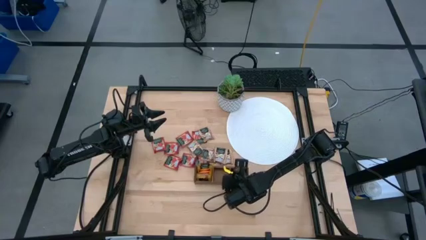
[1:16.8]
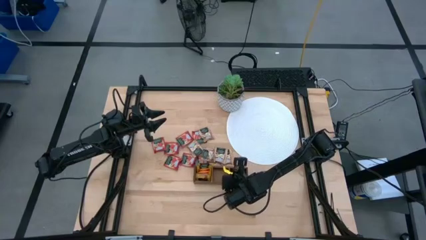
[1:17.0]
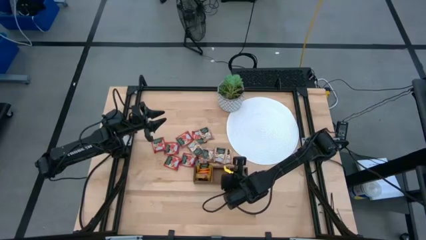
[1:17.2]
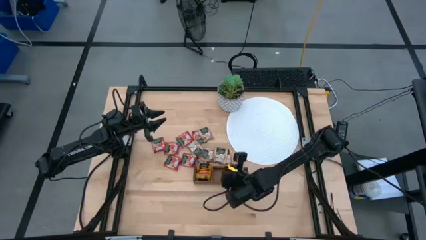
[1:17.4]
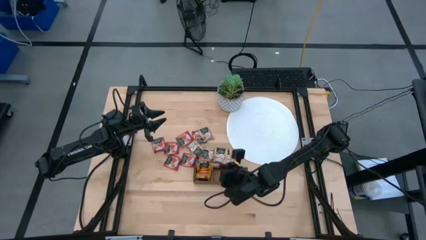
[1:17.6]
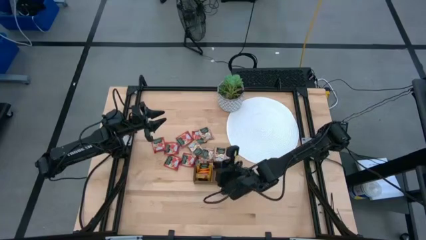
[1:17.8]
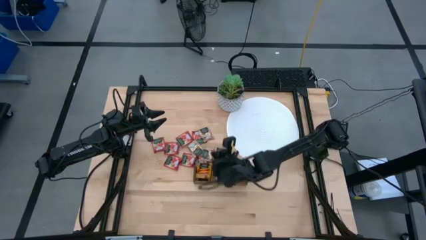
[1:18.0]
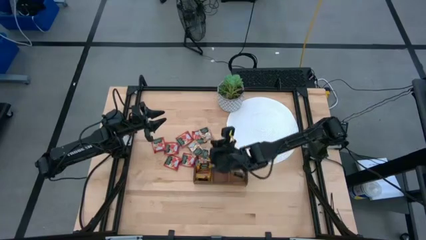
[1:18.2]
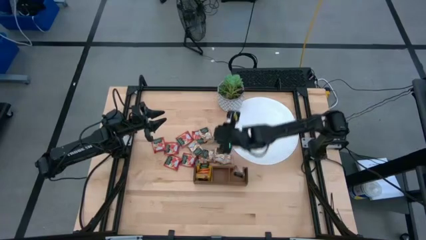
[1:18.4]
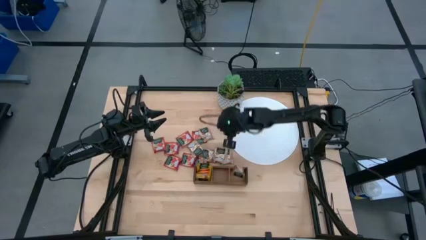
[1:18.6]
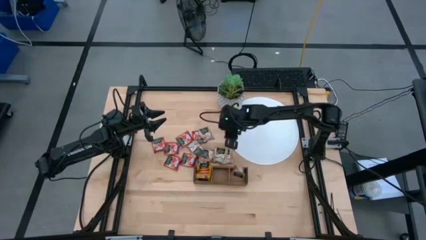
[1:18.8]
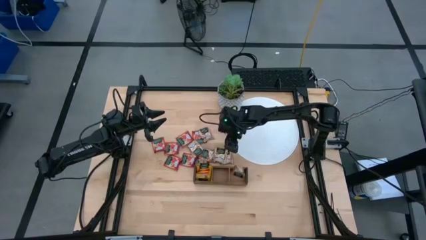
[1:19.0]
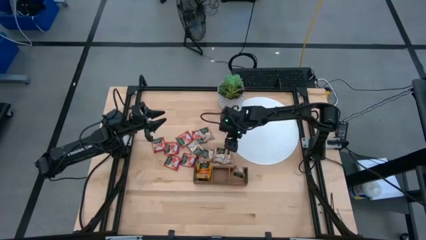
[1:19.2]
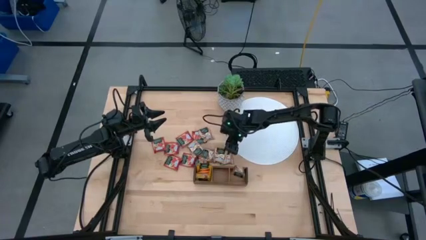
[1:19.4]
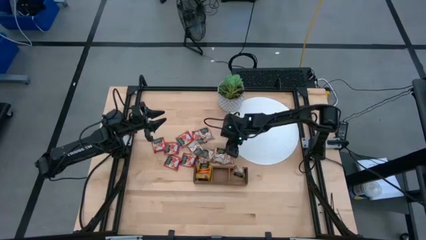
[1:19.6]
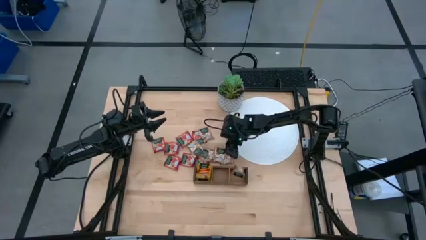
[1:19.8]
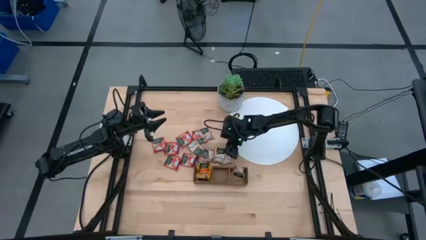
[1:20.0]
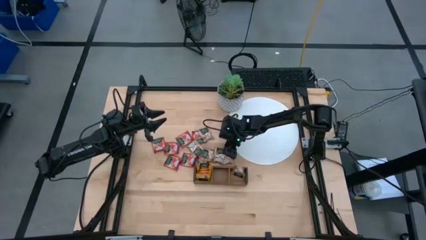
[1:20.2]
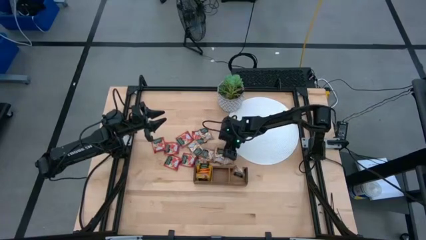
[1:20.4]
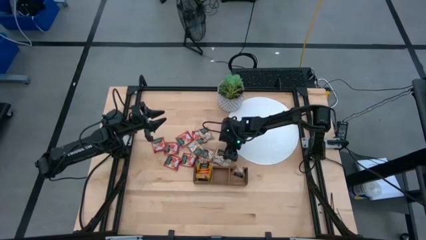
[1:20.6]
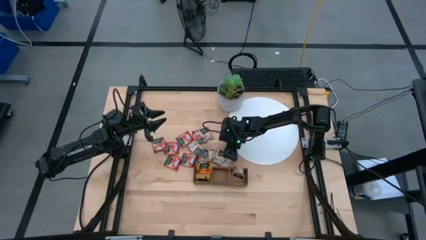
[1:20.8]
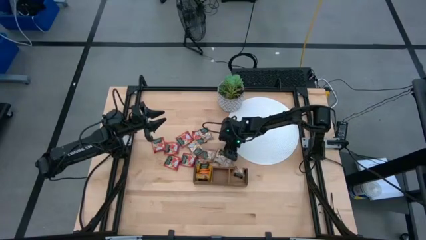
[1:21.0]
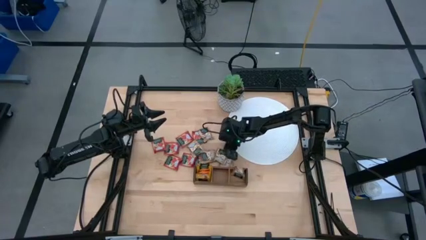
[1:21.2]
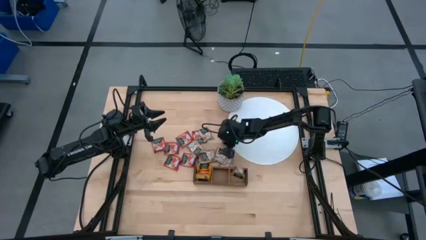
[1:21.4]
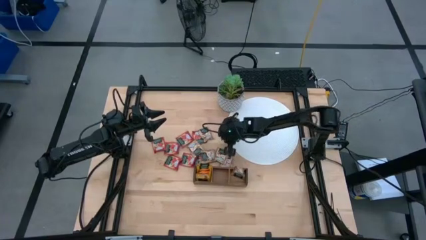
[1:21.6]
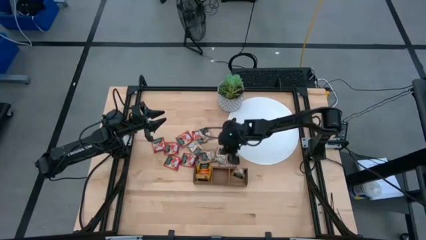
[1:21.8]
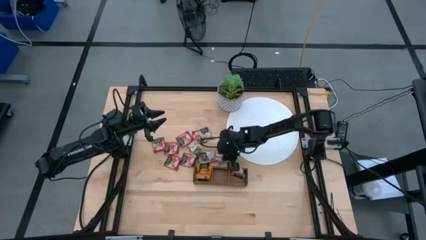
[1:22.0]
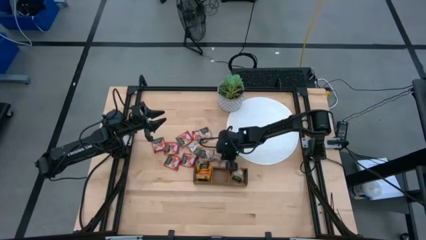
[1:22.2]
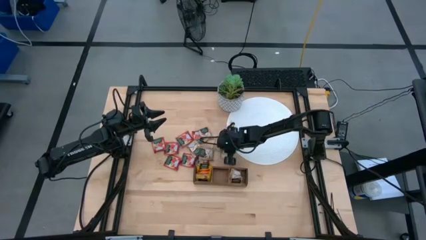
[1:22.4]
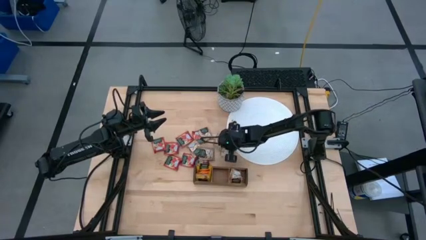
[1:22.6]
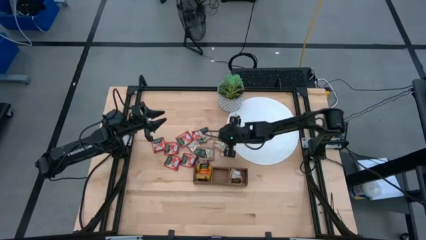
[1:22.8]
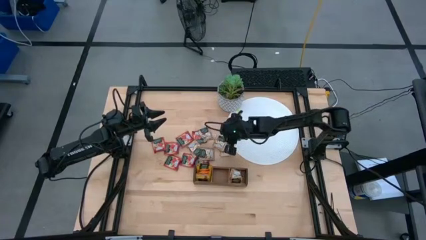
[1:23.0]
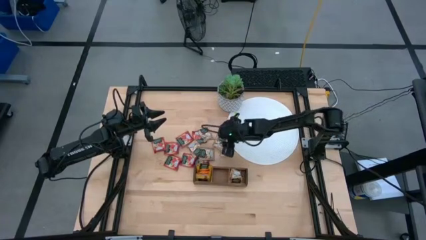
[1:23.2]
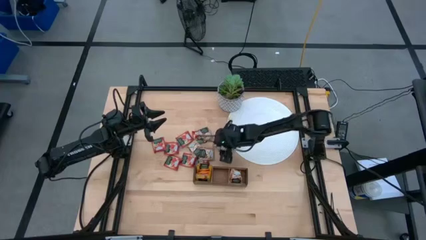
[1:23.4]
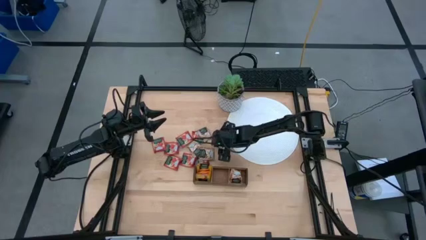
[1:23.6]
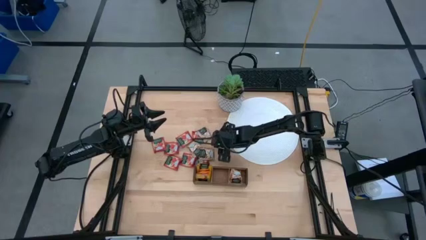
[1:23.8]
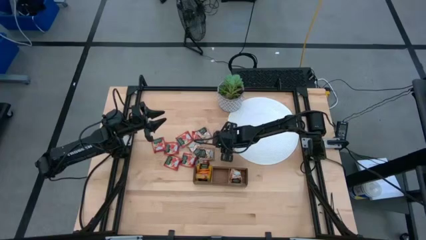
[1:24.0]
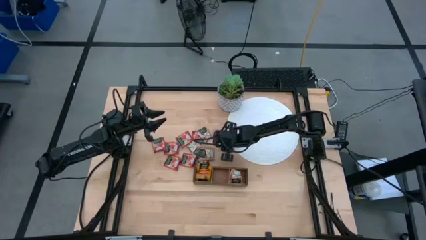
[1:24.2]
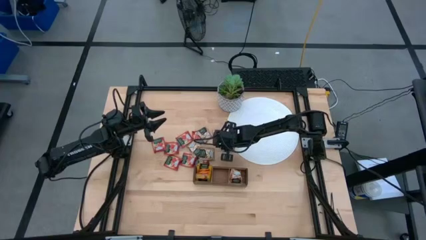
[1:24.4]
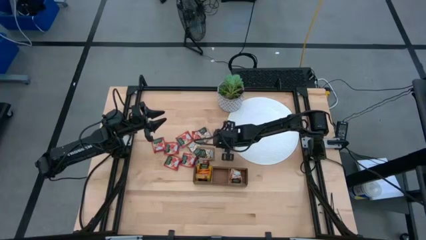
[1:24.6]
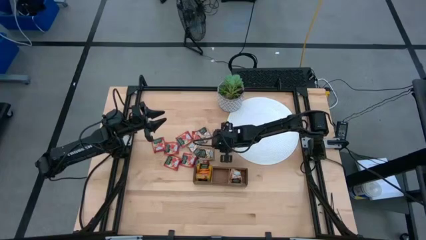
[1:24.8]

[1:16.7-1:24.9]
Task: Pick & Place Tea
Put the light brown tea bag into the right section of the wooden organizer

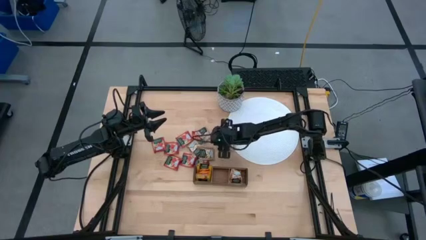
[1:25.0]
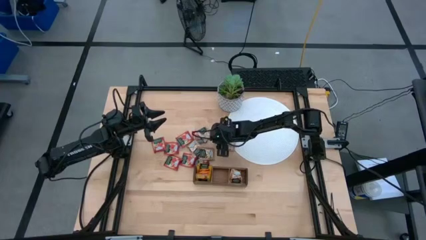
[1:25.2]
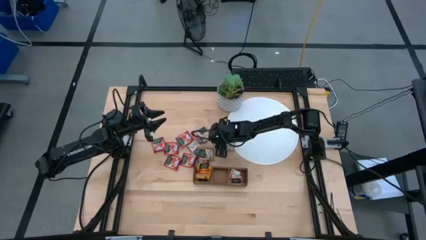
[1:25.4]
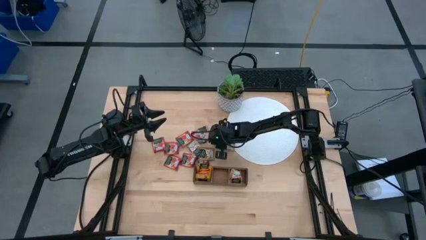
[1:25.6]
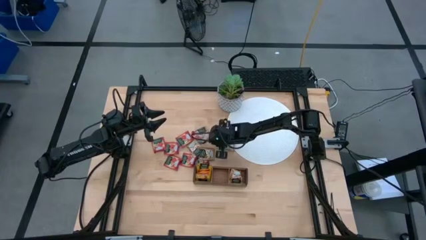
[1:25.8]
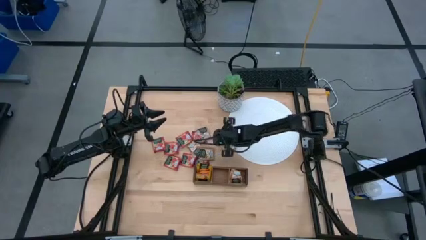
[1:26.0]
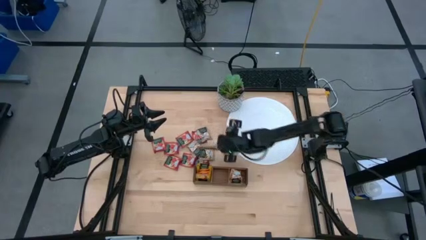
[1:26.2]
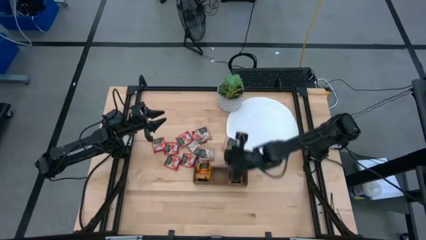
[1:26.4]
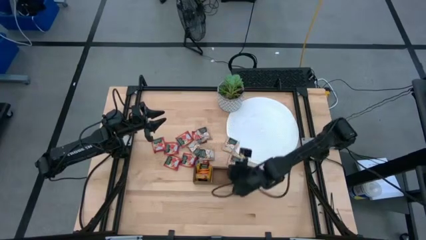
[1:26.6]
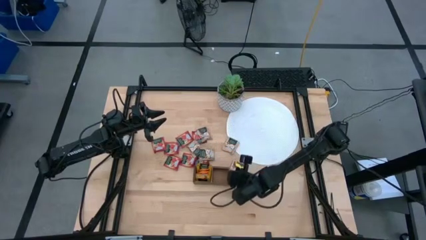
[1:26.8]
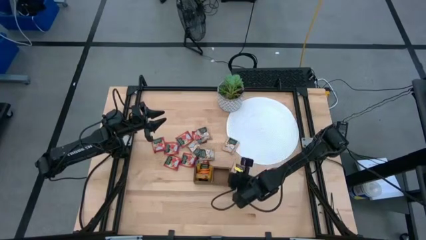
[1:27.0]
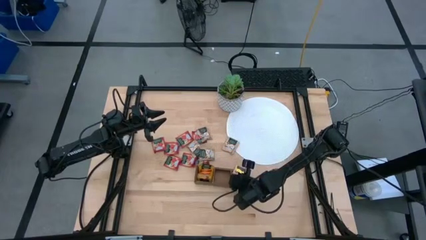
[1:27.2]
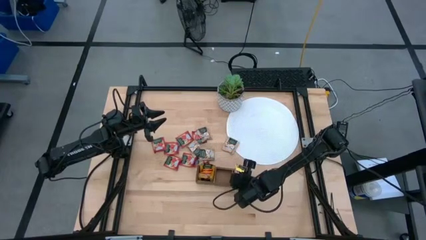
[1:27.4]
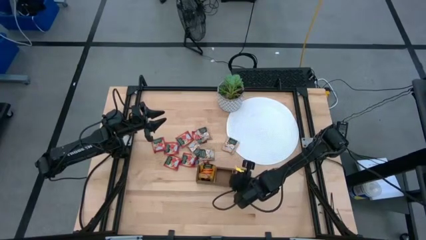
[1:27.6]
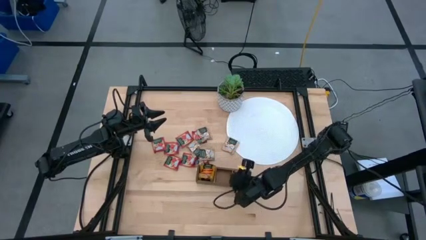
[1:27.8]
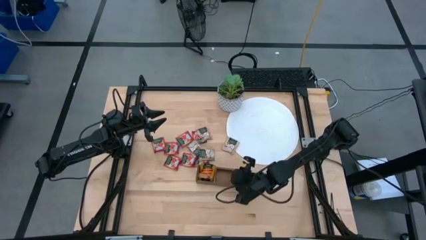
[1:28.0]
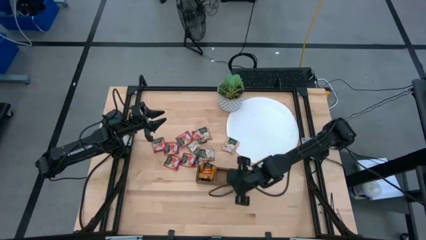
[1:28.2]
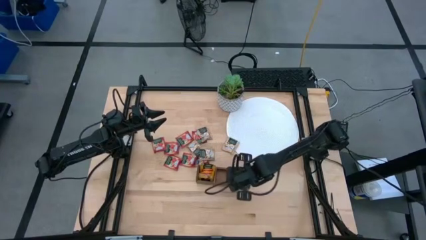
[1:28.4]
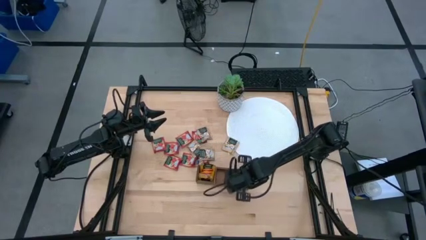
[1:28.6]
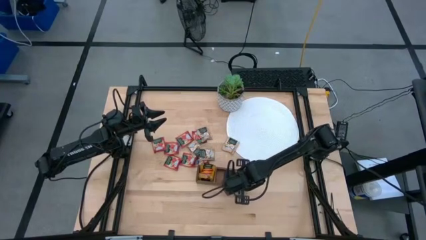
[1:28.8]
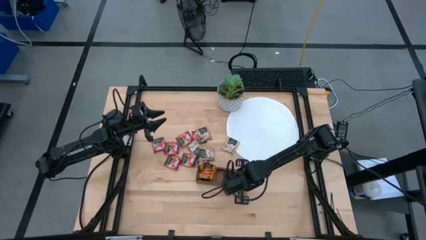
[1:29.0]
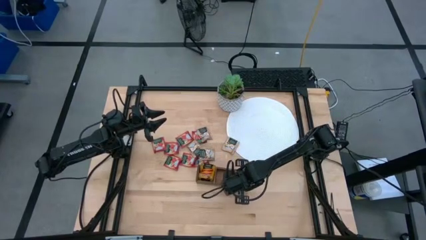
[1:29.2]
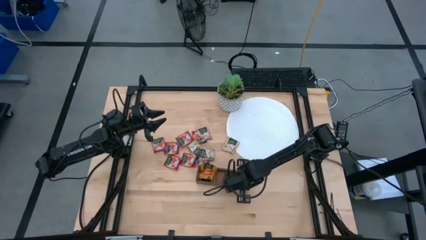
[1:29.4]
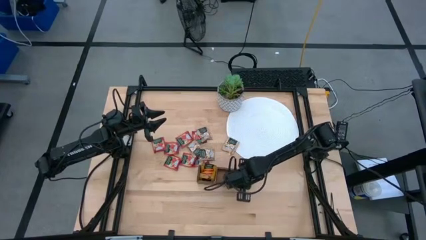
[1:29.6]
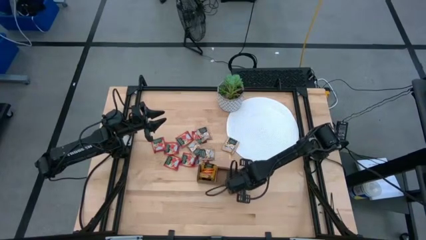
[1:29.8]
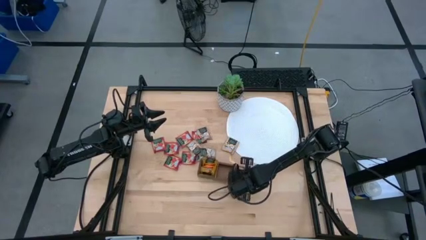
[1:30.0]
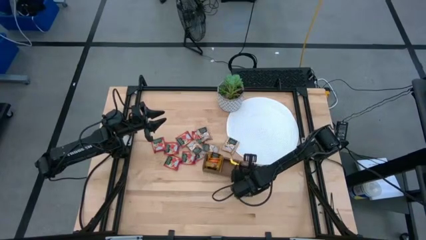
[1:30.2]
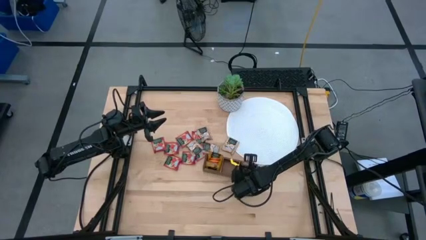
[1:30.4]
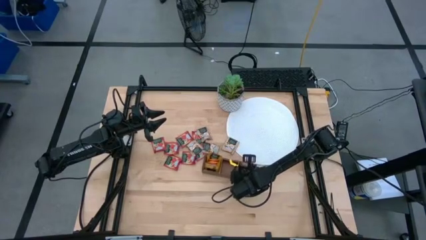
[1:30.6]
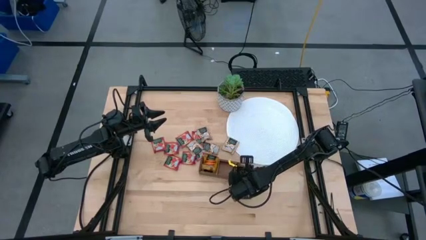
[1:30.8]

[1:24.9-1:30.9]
Put the light brown tea bag into the right section of the wooden organizer

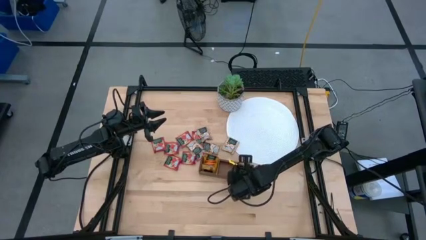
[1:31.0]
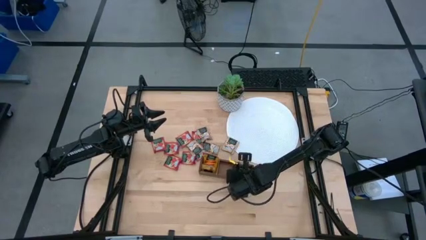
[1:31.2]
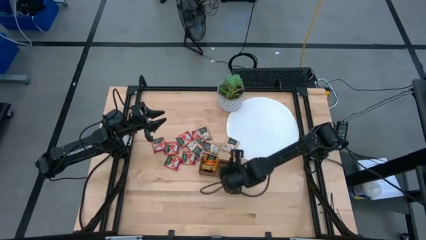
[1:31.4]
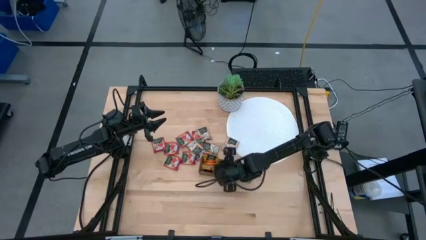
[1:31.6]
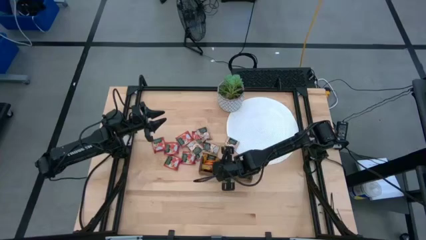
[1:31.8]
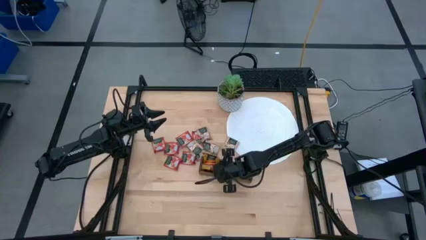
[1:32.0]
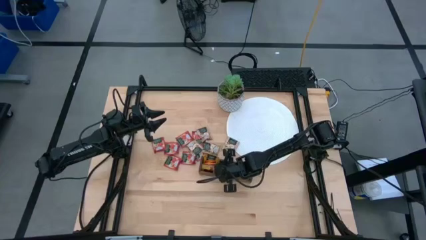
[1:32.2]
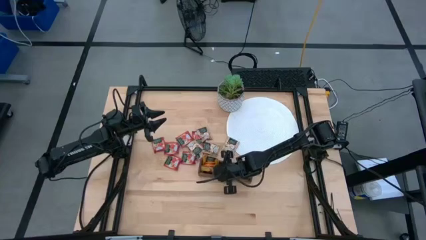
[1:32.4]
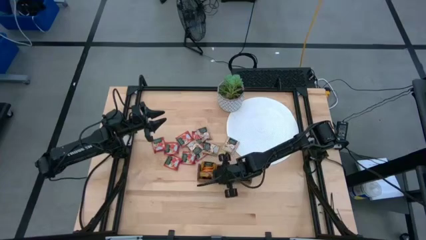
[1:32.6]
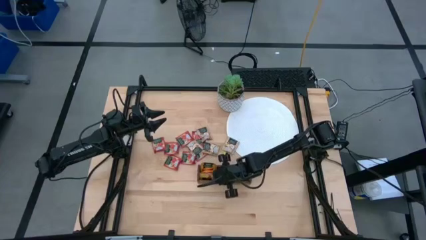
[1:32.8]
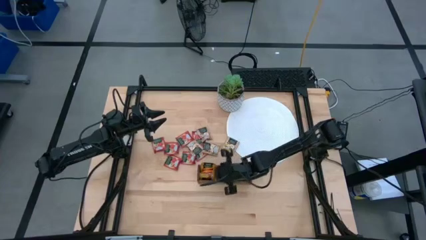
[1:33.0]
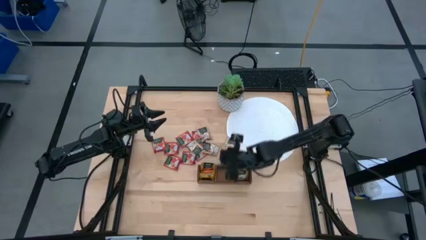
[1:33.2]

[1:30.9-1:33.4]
Adjust the wooden organizer

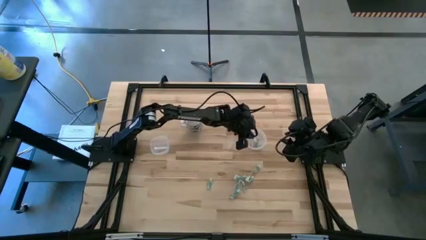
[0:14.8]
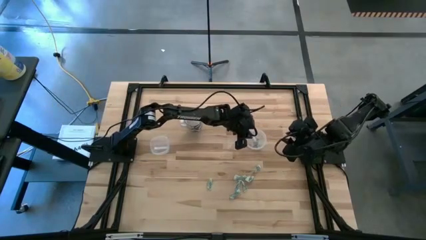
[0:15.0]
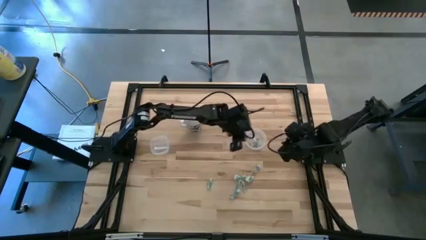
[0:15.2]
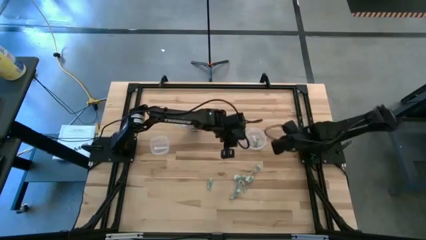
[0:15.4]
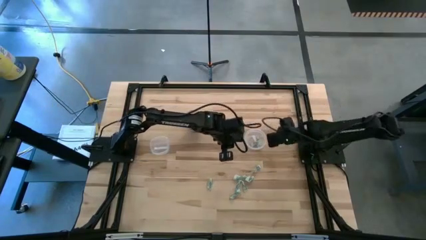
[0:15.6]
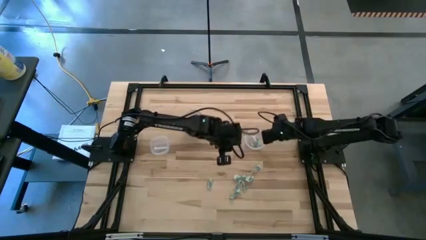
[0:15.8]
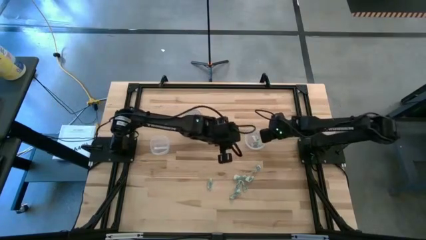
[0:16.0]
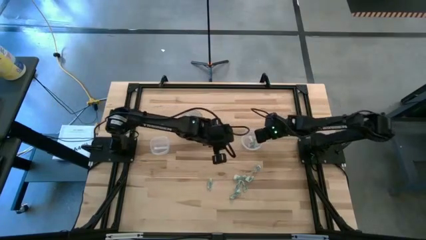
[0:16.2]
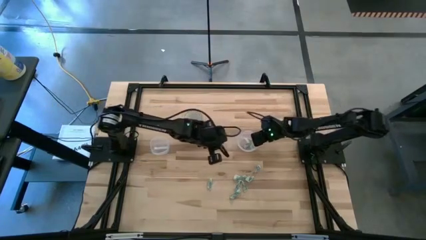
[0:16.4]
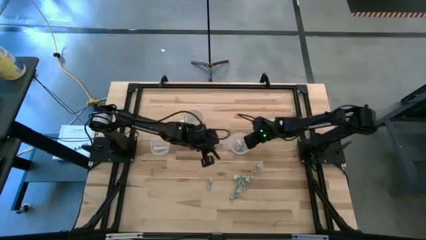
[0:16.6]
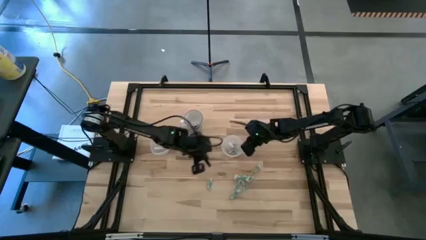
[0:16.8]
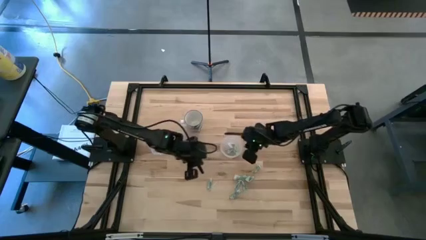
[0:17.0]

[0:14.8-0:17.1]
Task: Pick and place Stevia / Truvia into bins
Adjust the right transparent container
